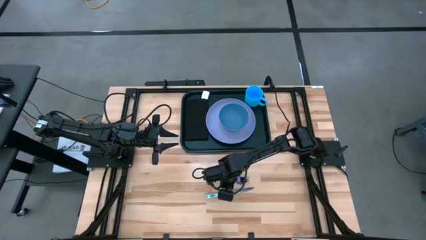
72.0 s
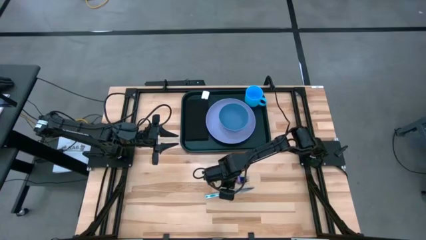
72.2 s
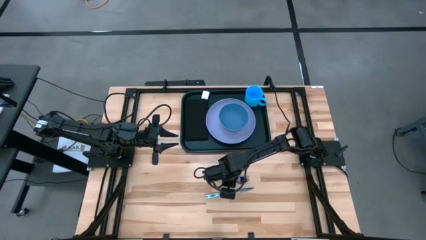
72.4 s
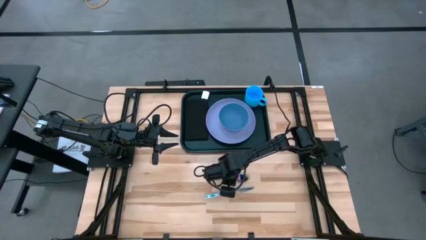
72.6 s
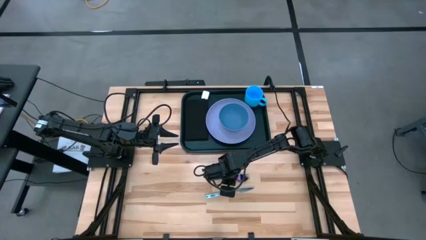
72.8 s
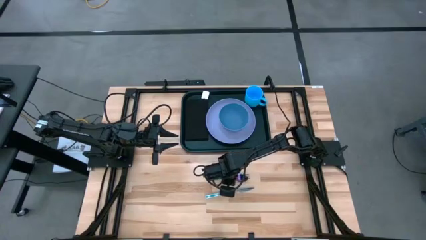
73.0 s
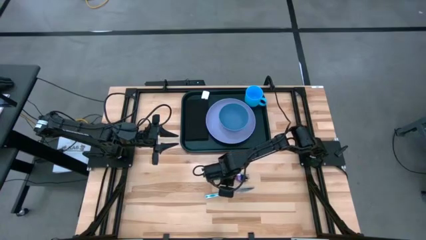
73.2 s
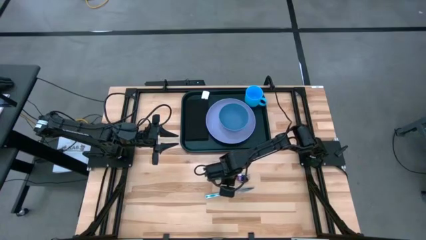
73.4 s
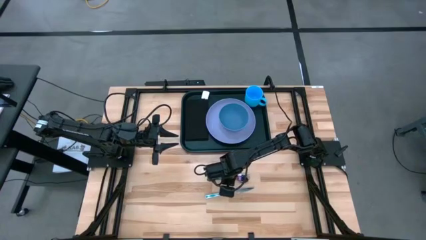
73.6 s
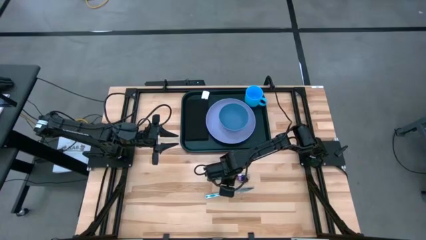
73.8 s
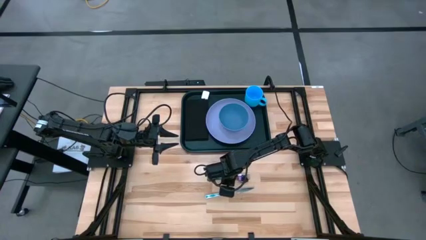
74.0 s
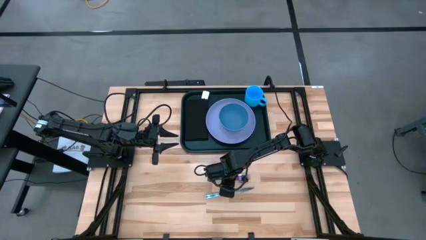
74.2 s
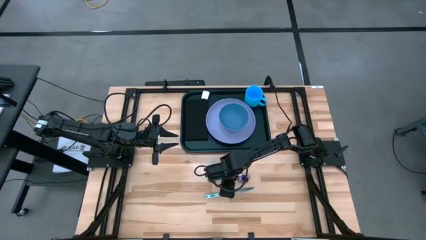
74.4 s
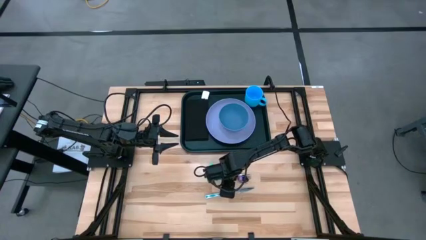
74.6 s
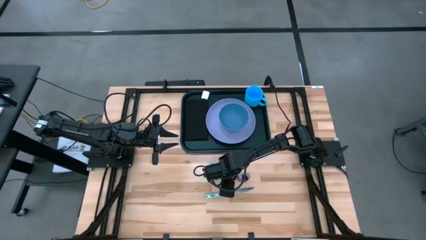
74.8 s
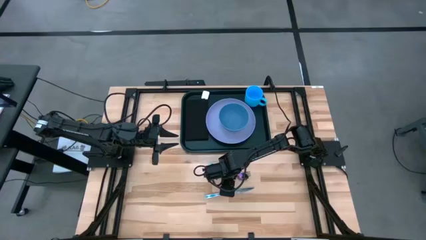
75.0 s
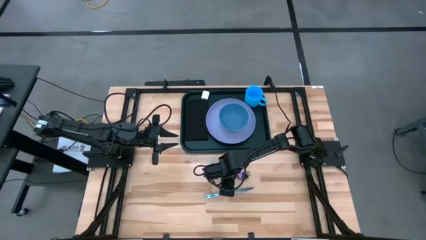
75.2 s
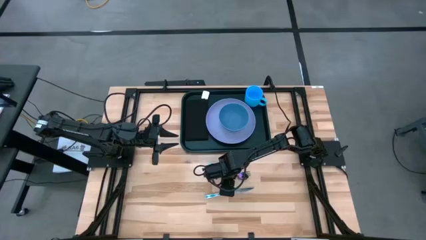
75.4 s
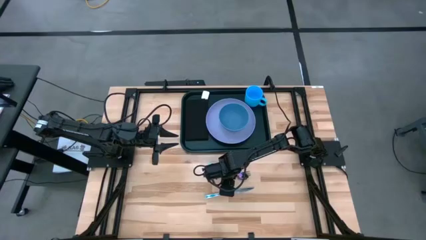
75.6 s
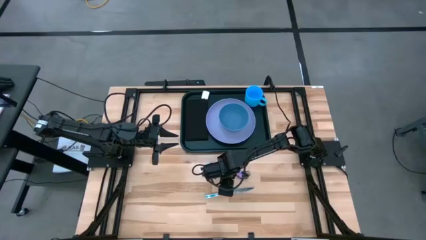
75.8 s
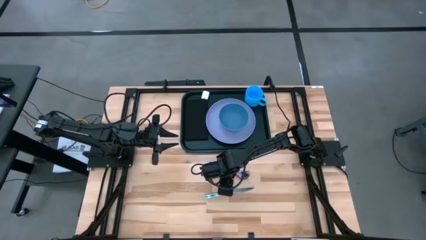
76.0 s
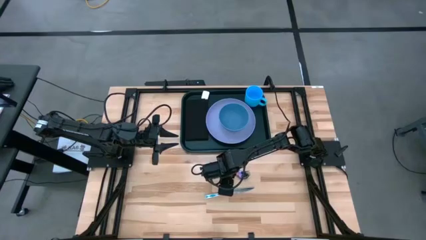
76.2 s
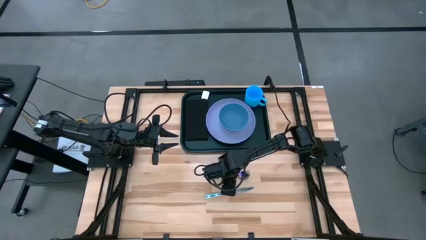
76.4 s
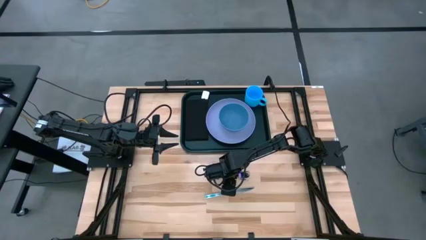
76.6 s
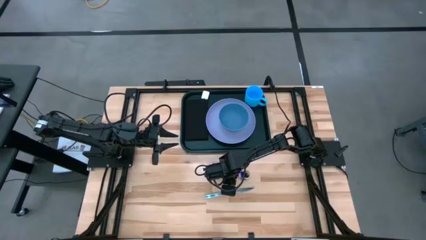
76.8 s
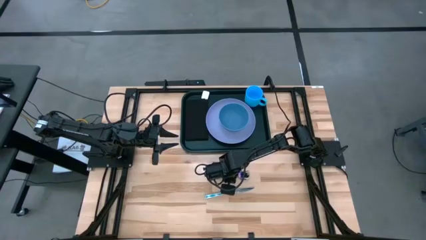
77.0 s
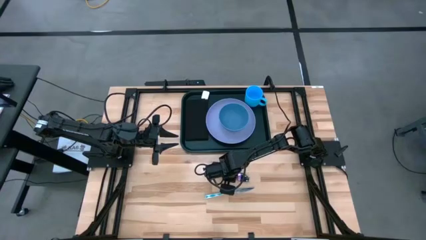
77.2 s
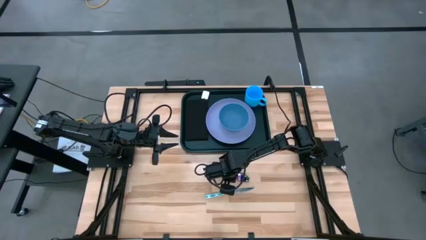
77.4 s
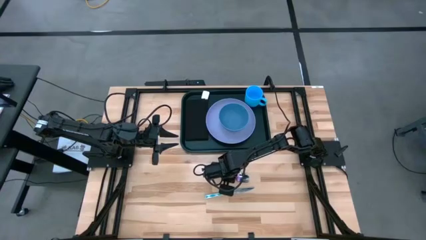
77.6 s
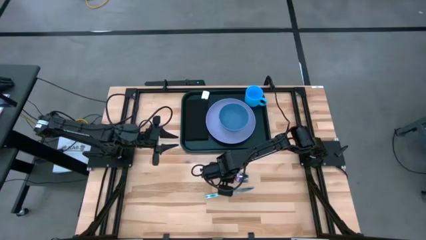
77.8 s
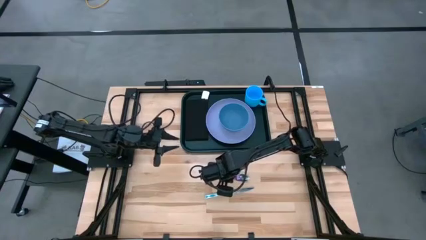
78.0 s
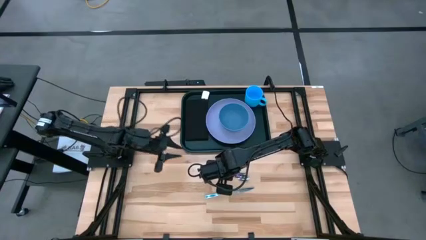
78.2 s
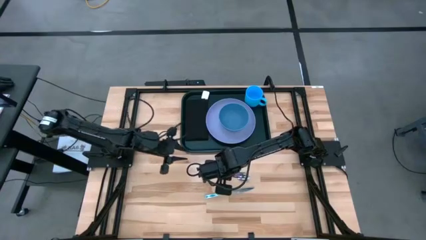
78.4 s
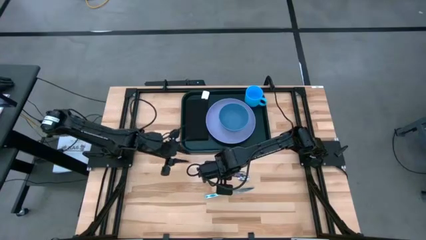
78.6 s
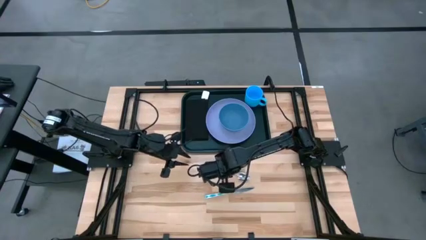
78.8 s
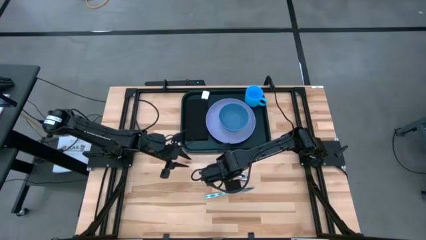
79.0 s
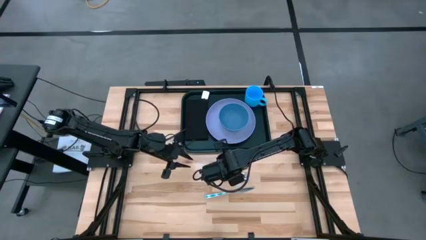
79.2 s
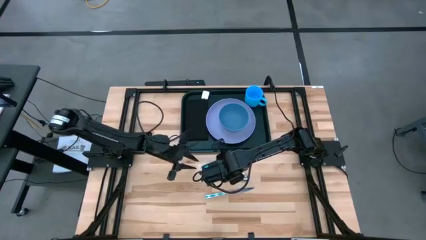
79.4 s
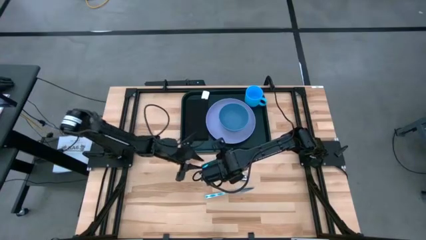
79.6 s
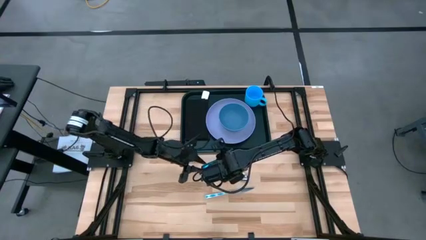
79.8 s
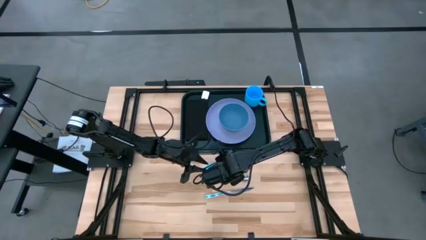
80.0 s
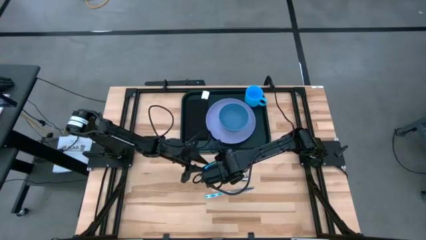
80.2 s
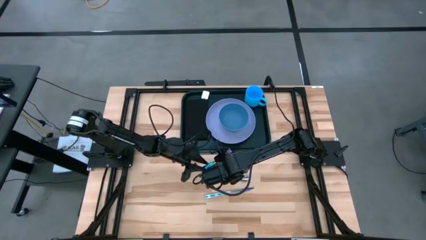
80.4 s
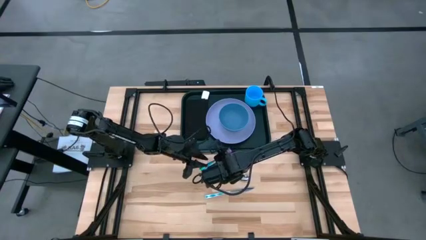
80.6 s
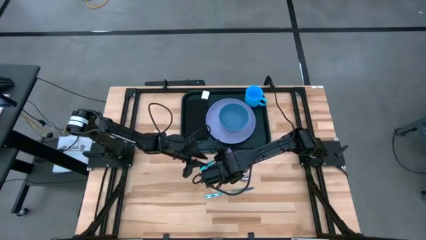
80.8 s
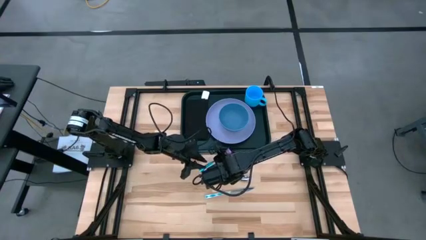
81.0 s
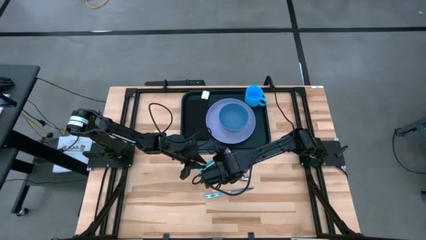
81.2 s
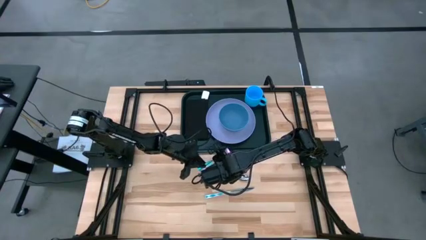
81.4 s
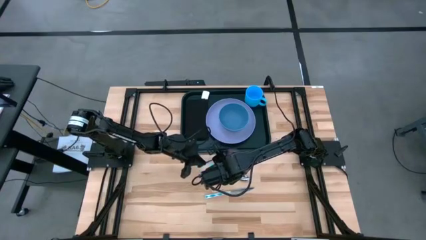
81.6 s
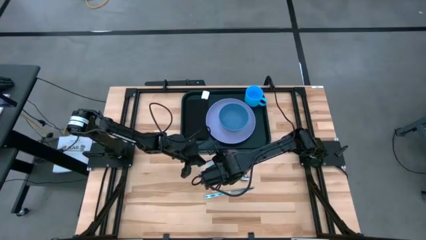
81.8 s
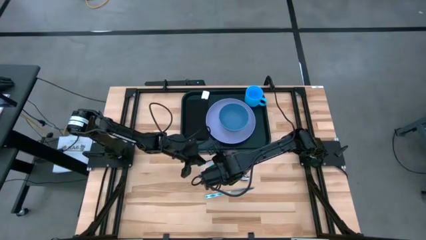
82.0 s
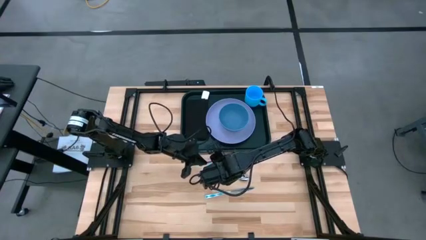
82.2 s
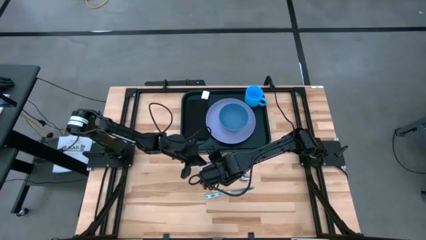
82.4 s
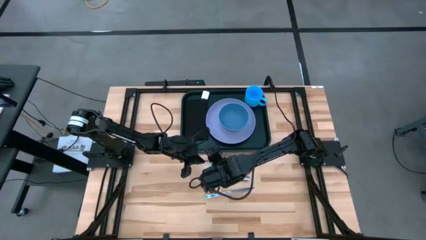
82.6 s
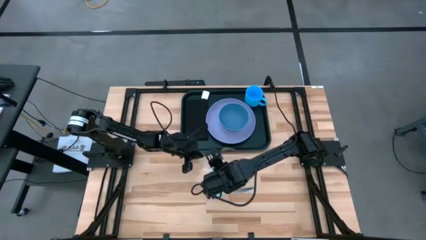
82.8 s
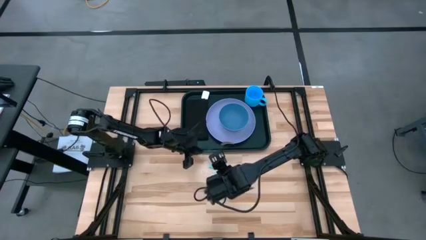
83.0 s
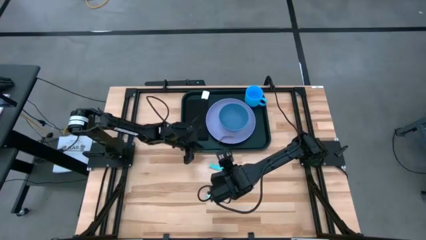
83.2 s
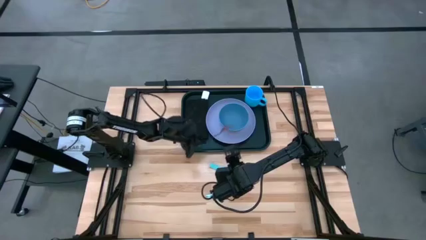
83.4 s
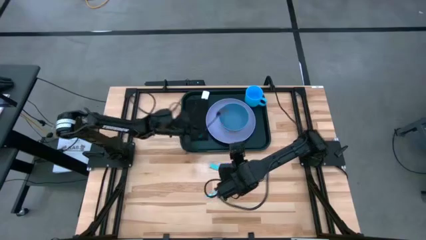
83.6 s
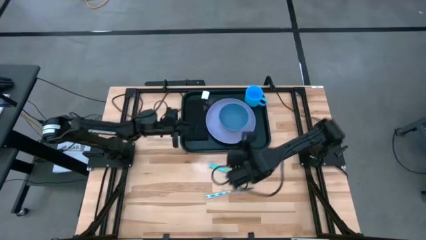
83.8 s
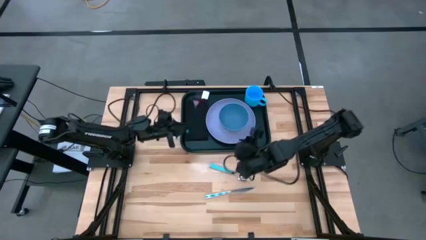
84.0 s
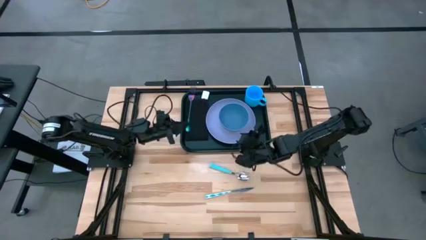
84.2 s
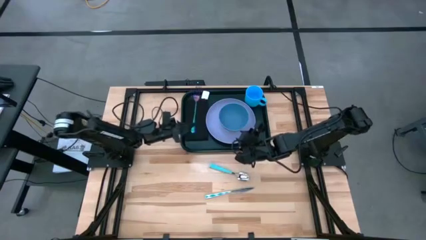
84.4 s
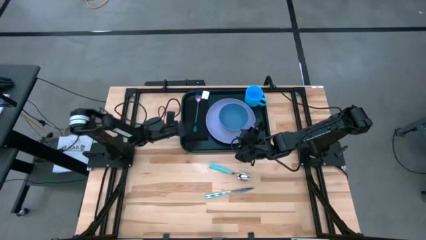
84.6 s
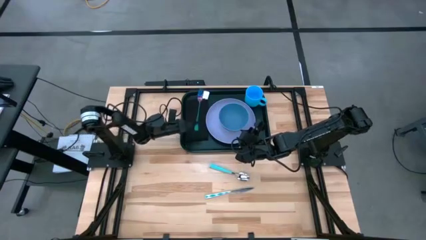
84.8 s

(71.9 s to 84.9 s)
Task: Set up tray
Put the blue fork on the black napkin on the black tray

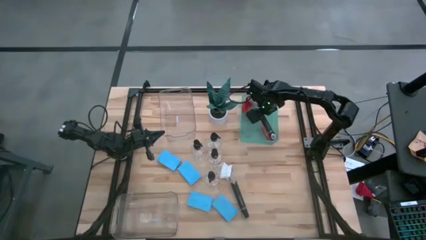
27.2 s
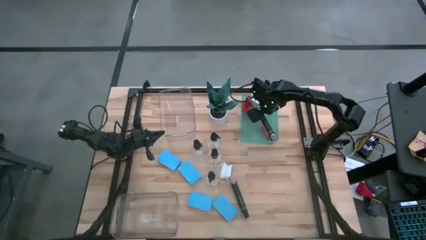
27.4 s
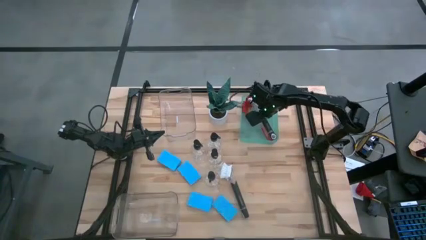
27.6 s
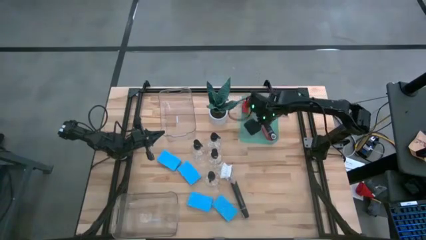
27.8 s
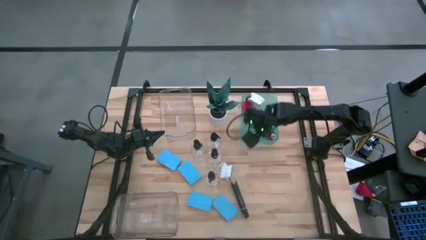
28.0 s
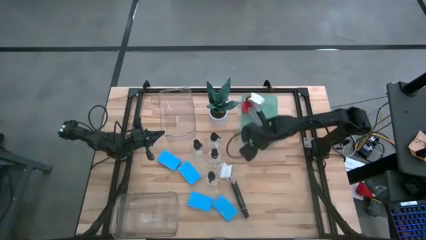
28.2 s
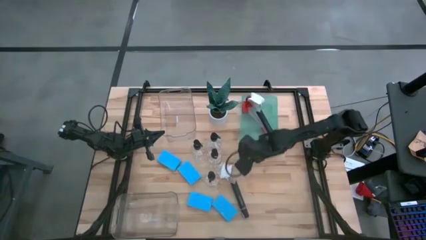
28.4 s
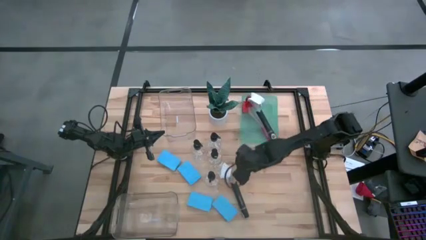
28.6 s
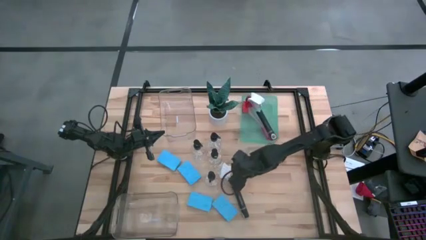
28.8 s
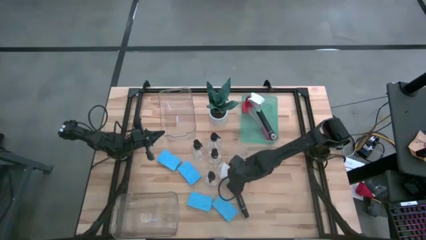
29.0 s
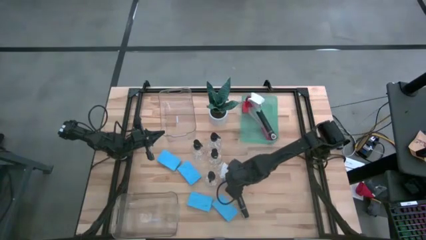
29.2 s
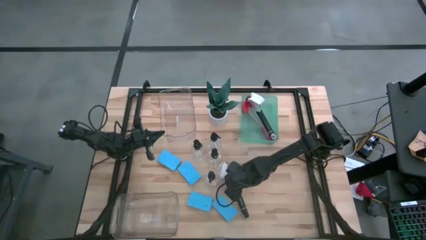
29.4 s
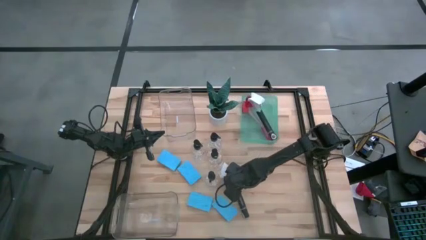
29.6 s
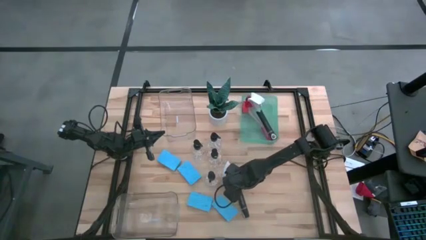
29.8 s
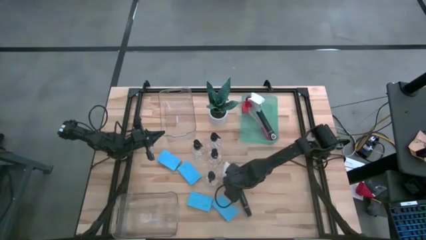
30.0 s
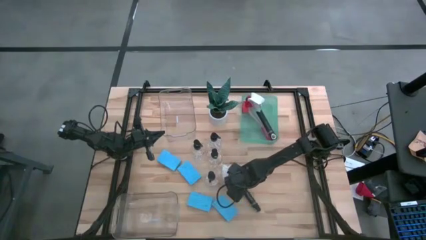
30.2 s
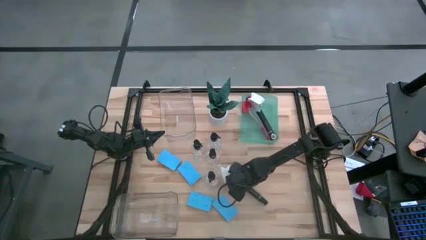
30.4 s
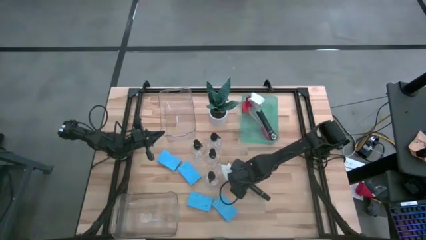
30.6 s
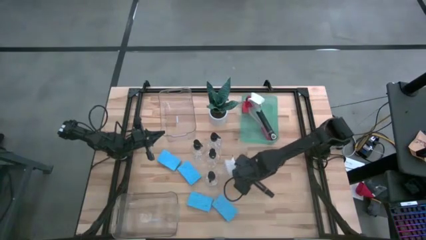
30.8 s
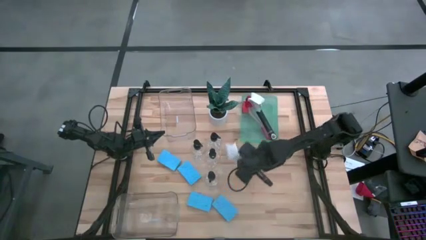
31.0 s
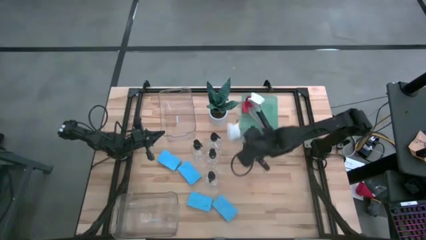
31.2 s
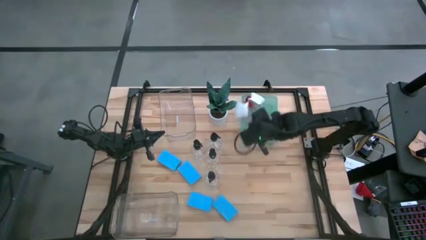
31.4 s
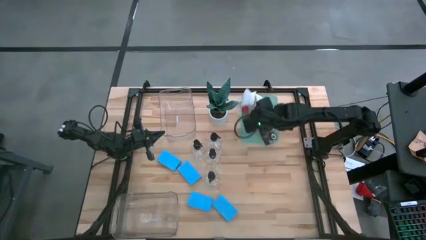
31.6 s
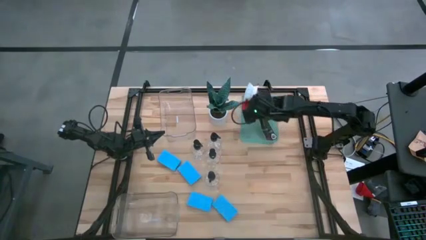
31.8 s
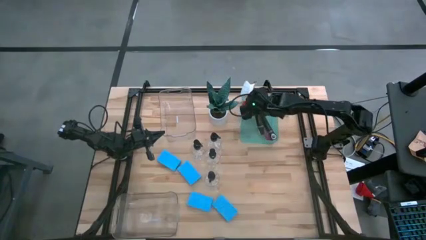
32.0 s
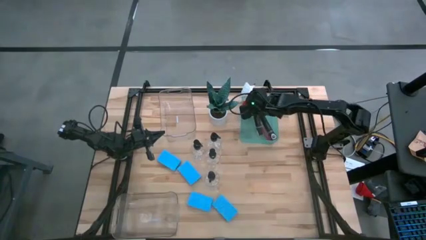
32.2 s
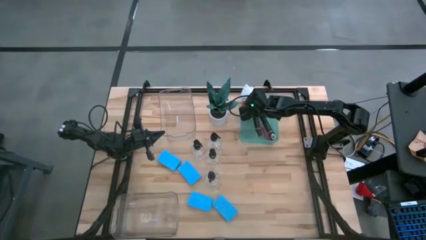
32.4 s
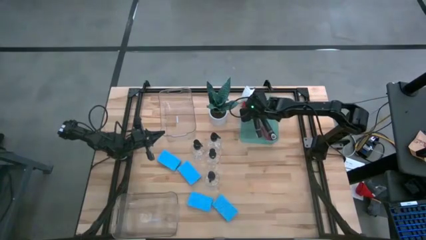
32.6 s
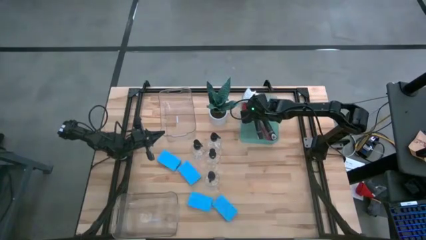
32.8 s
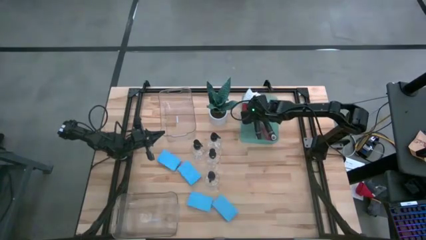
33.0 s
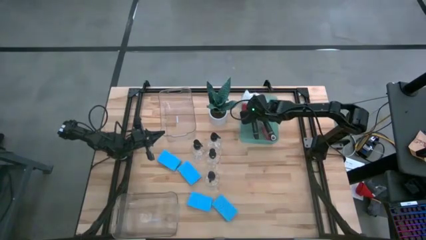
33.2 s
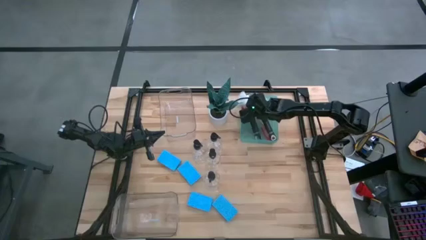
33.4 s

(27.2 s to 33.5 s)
Task: Pick & Place Kitchen Sink Supplies
Put the black dish brush into the green bin
